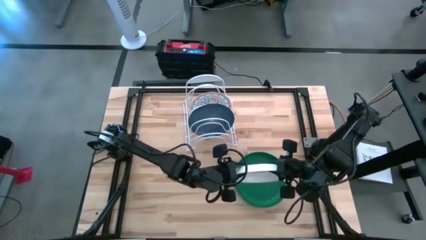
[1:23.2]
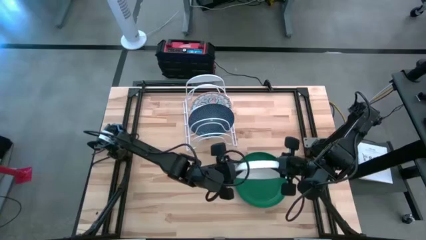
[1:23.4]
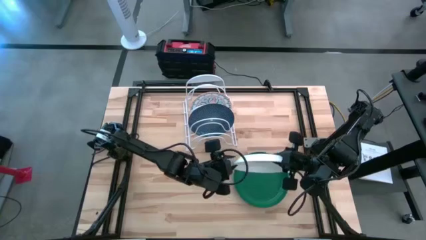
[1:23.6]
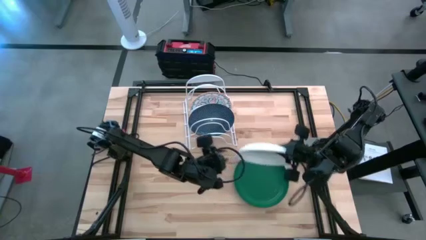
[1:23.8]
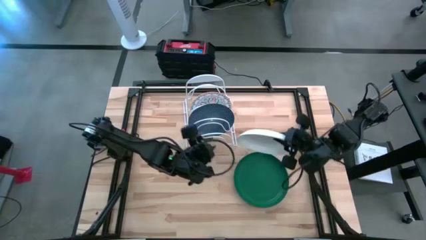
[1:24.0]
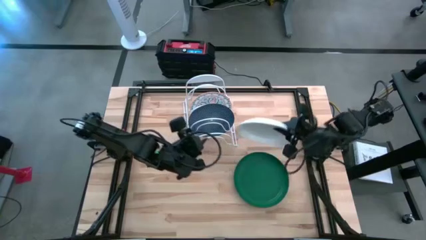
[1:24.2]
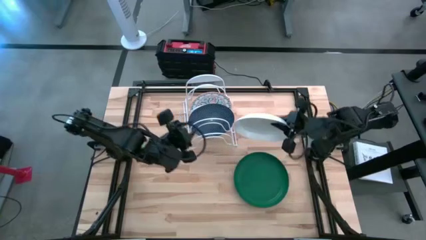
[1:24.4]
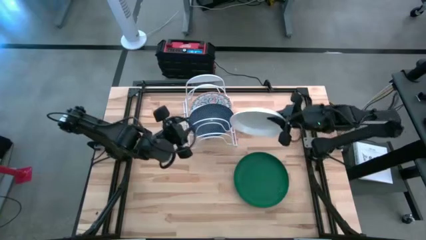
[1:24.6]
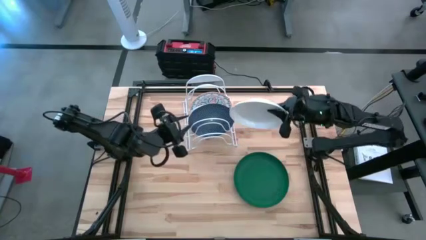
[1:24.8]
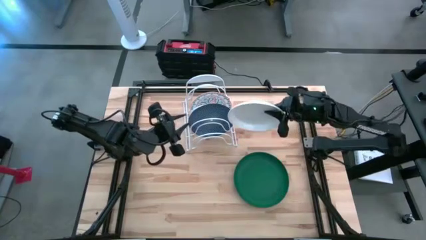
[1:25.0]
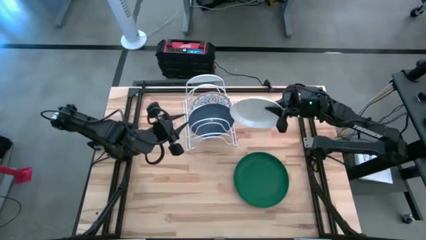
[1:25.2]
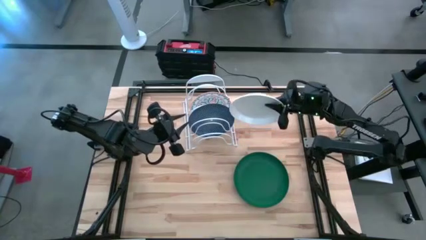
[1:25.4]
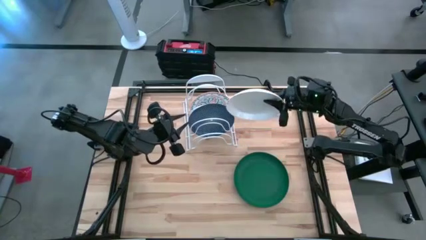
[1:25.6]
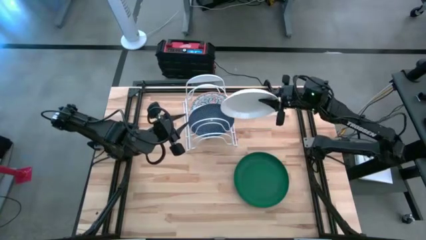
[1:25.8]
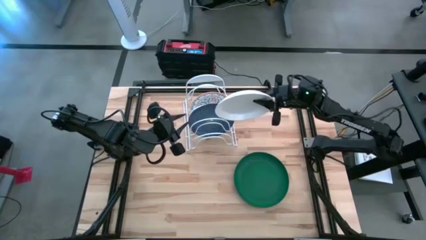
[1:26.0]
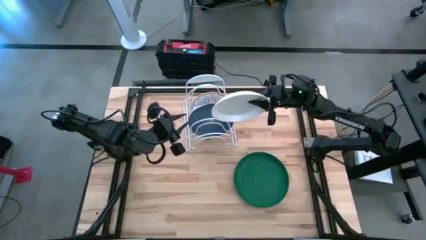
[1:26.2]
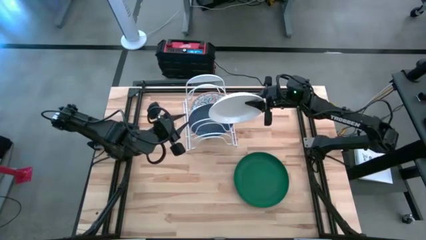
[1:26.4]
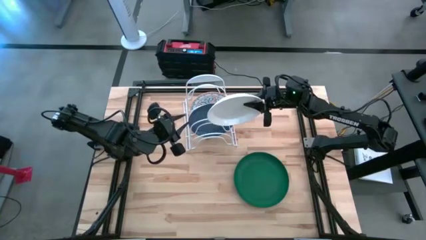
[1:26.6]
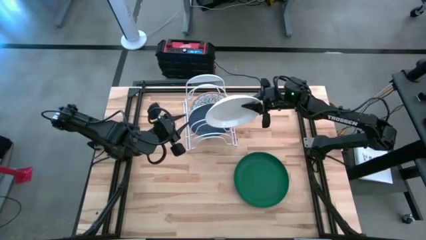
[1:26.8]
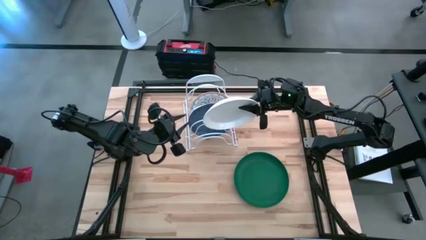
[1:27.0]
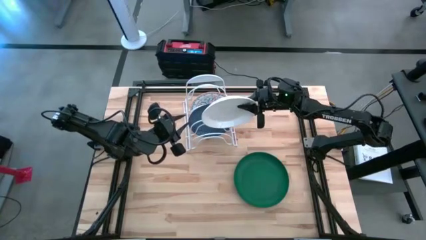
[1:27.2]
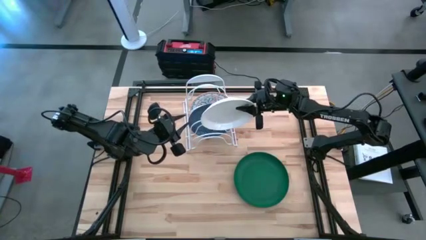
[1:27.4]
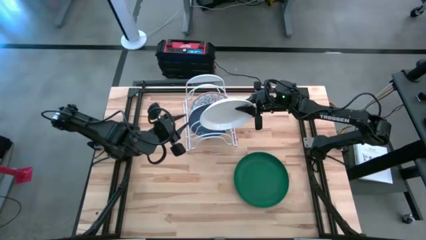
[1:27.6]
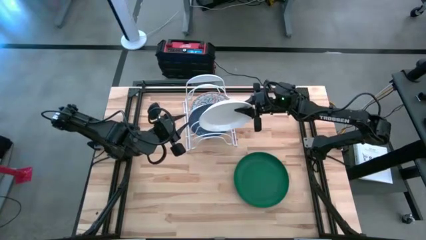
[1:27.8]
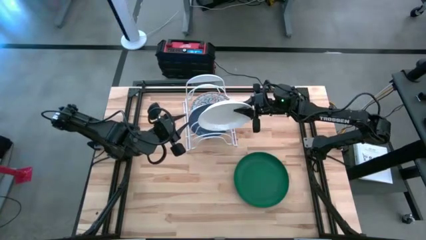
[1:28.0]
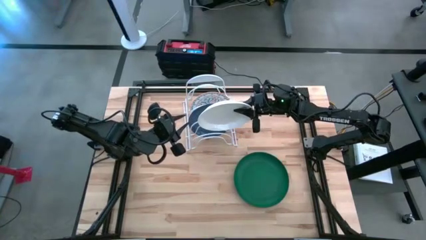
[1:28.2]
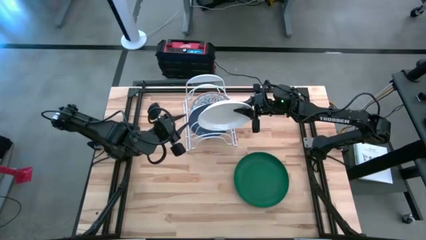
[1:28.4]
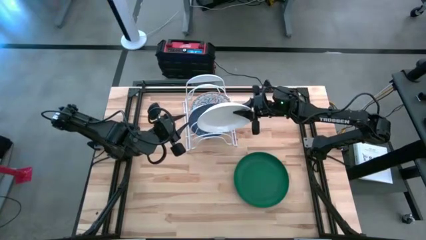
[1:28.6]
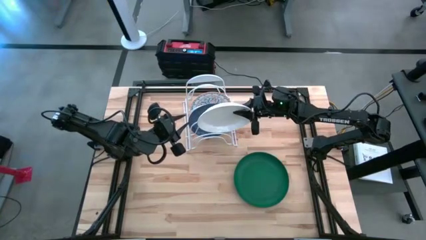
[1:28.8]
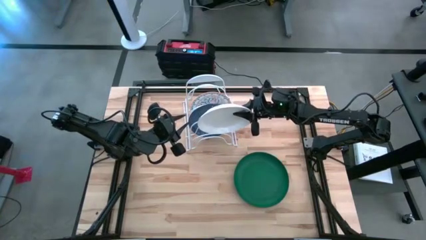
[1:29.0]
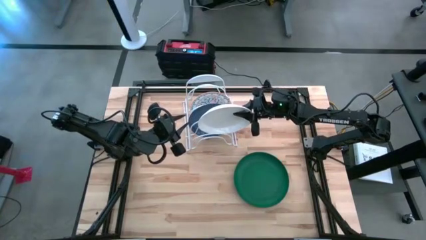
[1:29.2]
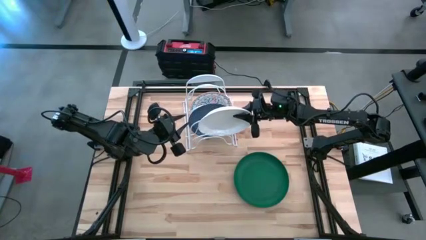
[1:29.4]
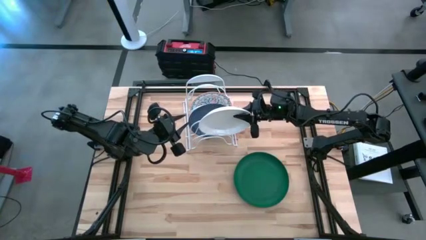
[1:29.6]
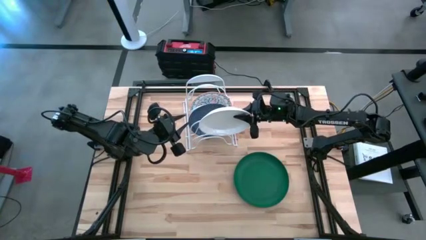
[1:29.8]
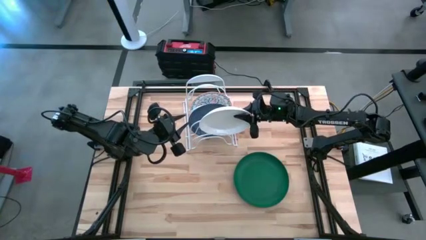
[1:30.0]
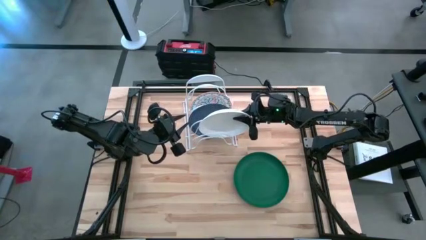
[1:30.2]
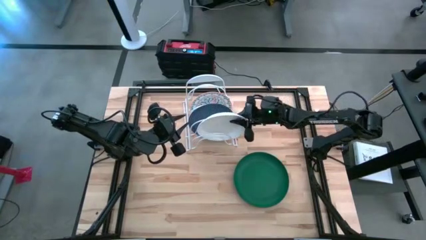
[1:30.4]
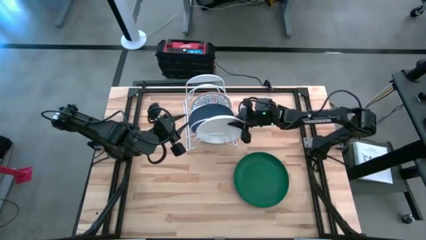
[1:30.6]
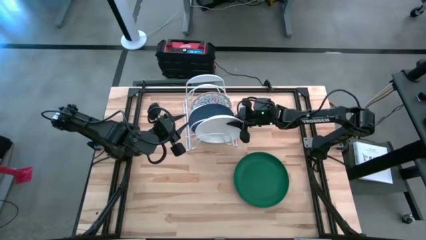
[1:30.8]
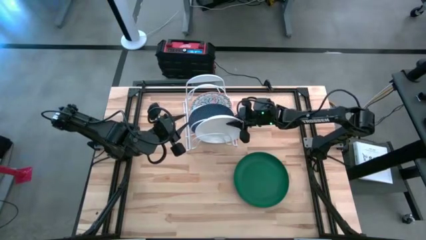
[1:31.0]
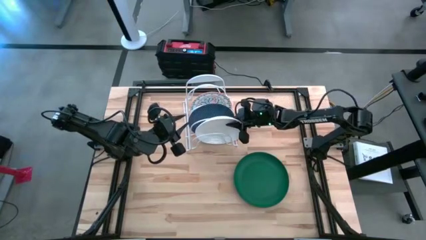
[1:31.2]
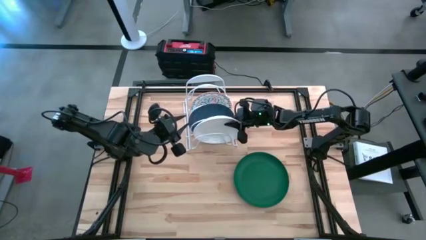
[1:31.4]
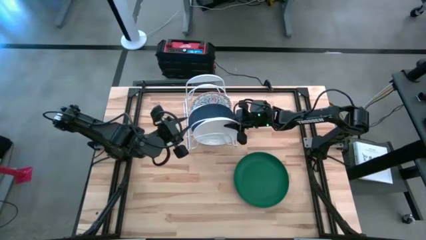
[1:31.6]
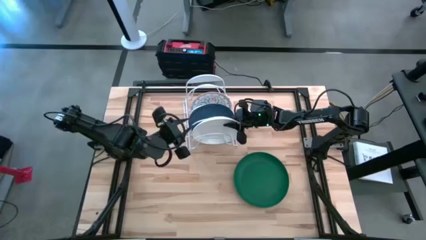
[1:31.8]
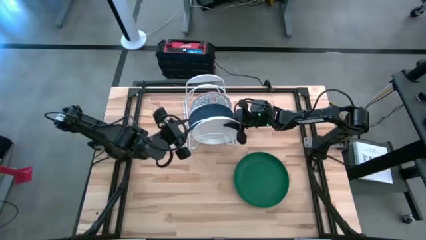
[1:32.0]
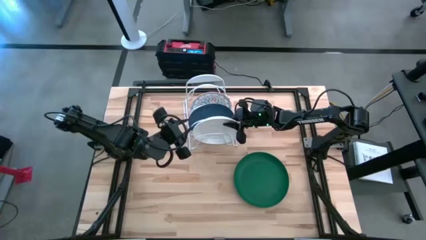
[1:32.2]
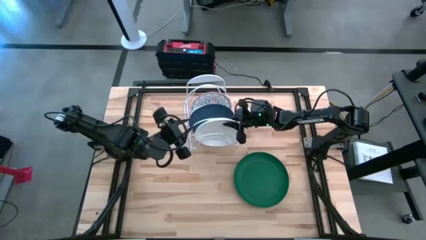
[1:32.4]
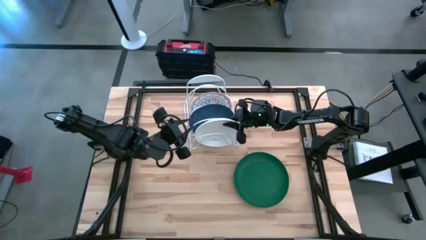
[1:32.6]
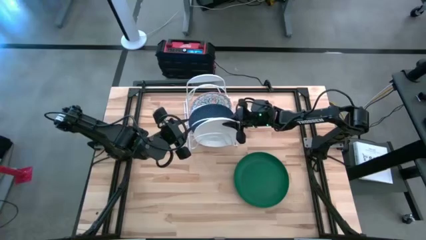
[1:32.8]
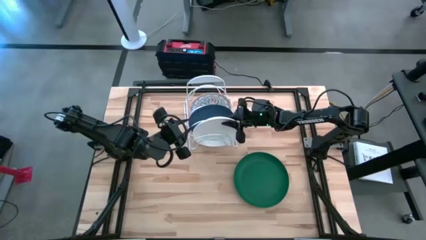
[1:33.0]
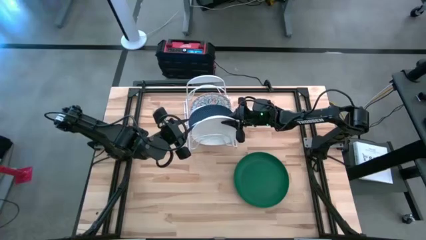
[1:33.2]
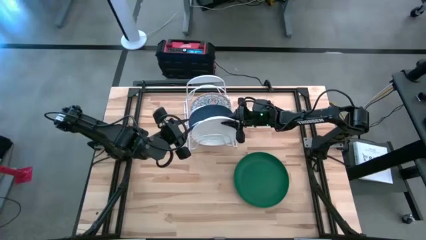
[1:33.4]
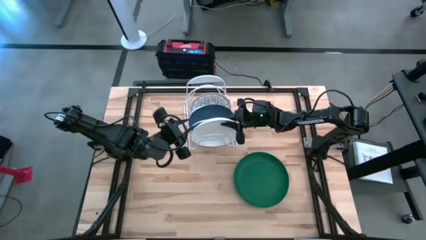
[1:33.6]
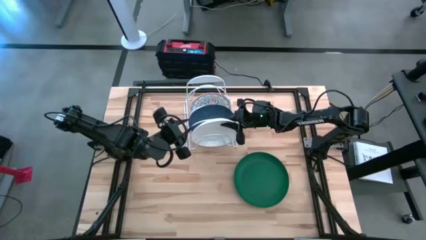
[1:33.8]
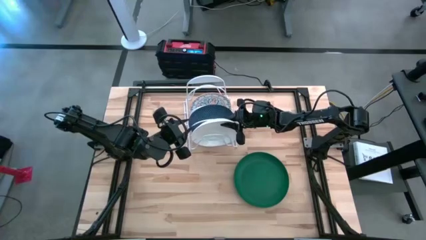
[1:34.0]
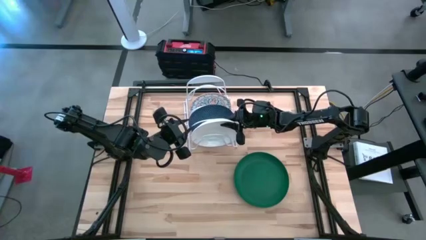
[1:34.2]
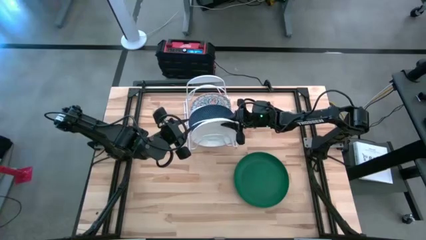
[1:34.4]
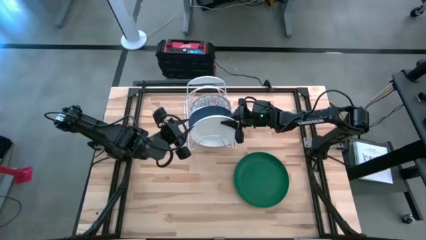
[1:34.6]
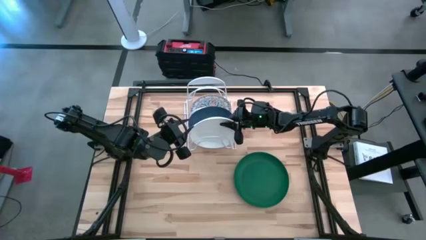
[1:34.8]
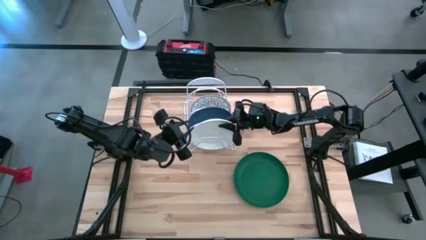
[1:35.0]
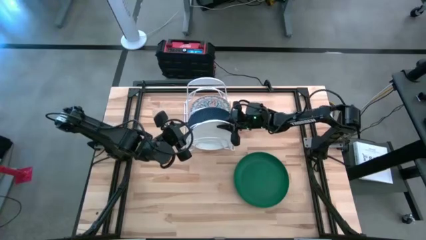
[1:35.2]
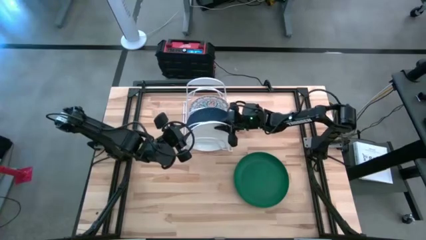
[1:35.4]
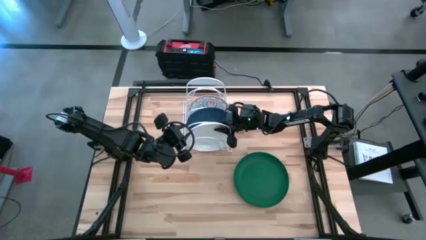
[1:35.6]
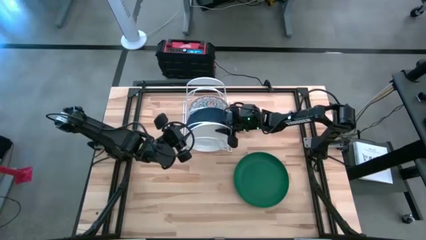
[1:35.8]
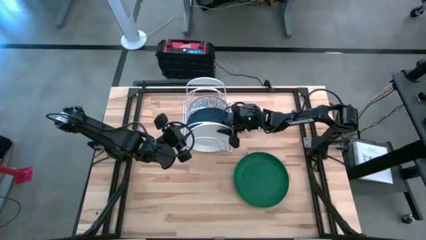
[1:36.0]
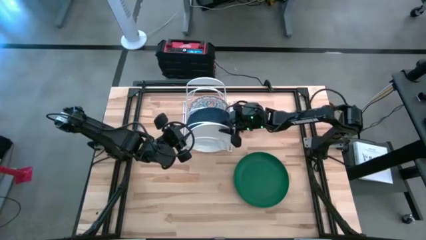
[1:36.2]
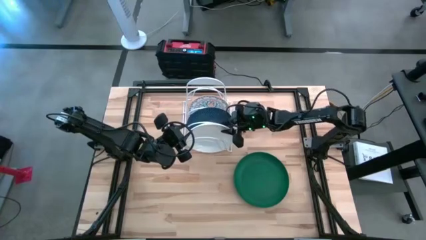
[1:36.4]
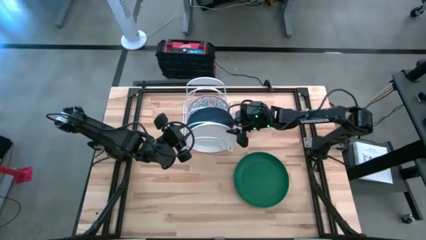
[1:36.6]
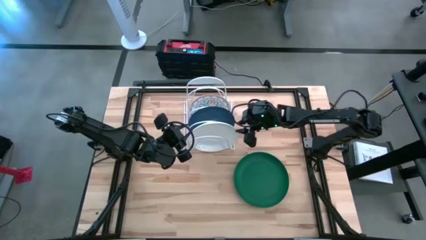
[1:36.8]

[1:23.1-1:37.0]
Task: Sort dishes
Put the white plate into the dish rack

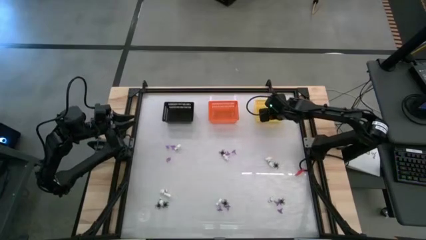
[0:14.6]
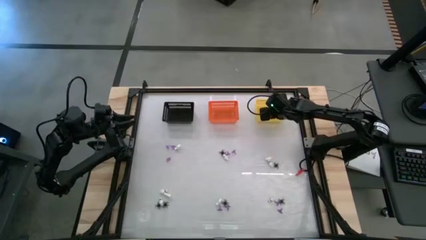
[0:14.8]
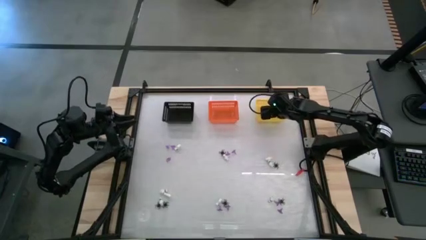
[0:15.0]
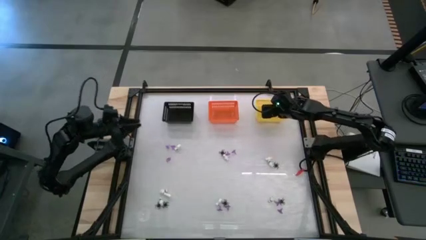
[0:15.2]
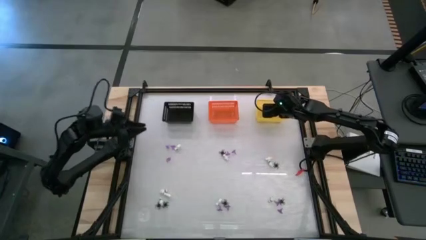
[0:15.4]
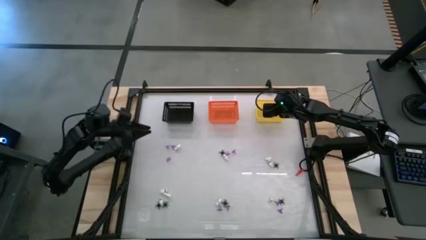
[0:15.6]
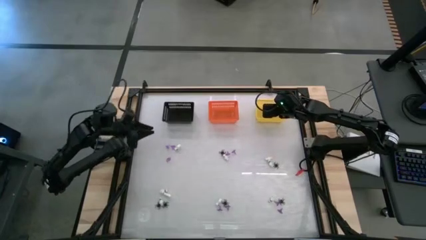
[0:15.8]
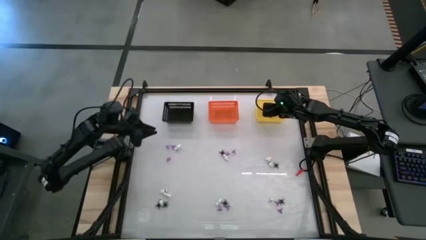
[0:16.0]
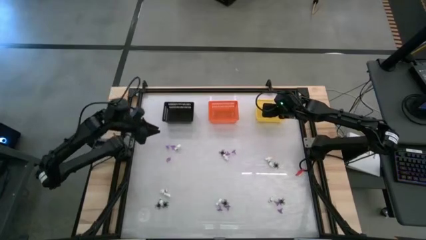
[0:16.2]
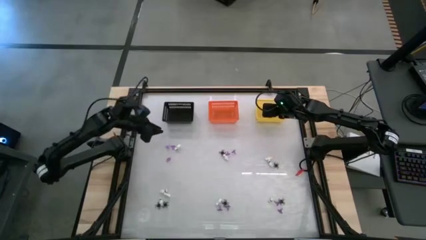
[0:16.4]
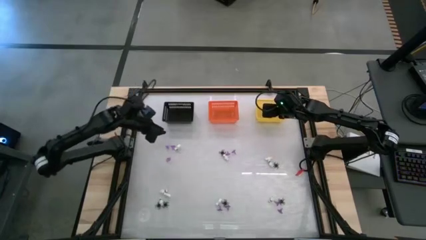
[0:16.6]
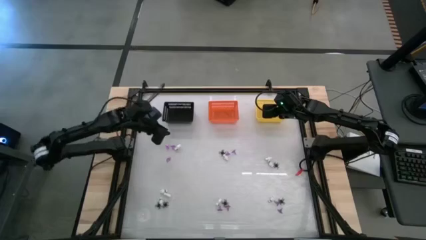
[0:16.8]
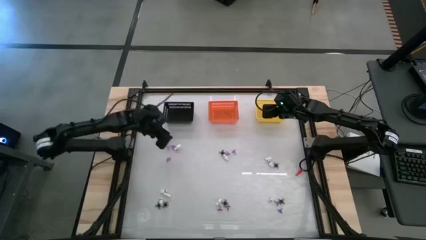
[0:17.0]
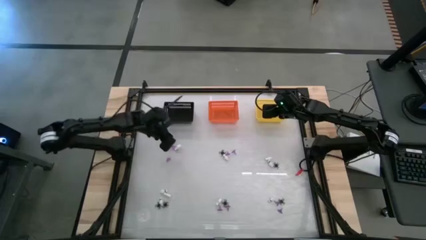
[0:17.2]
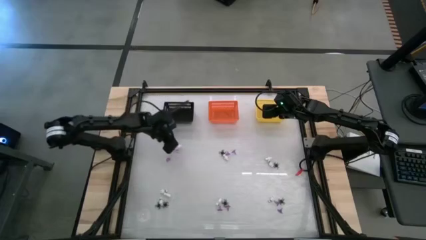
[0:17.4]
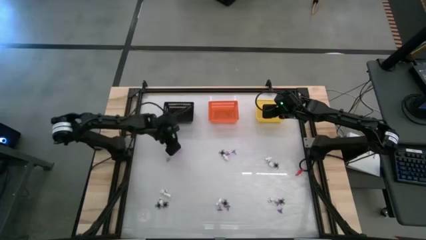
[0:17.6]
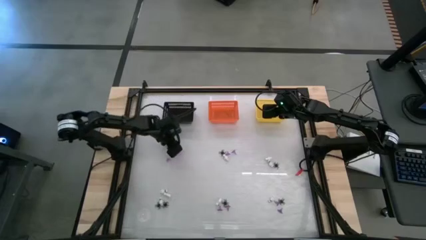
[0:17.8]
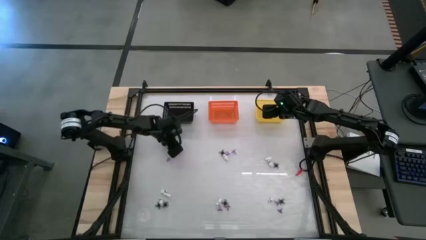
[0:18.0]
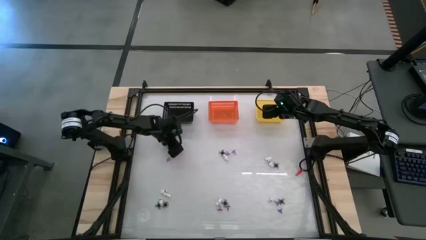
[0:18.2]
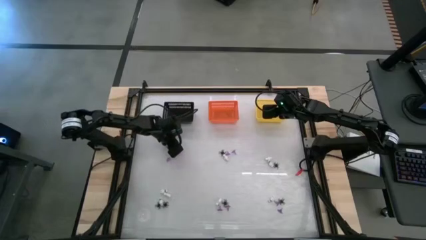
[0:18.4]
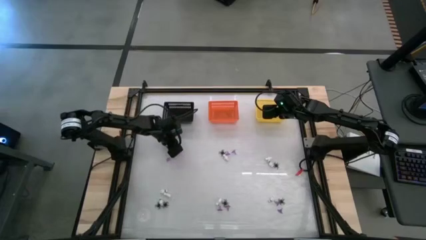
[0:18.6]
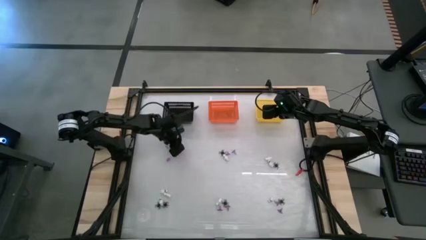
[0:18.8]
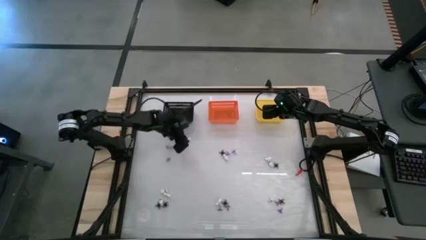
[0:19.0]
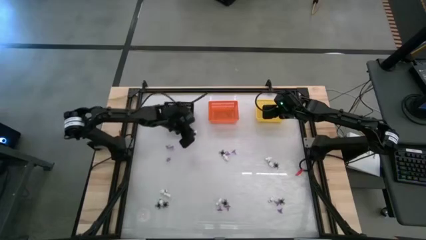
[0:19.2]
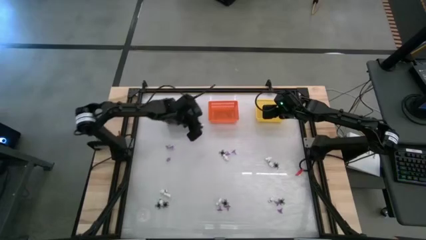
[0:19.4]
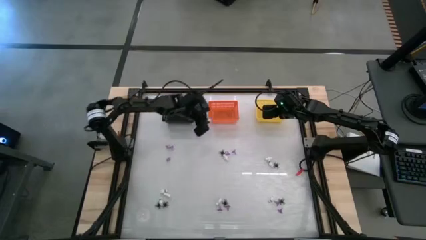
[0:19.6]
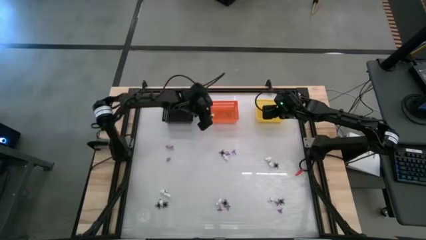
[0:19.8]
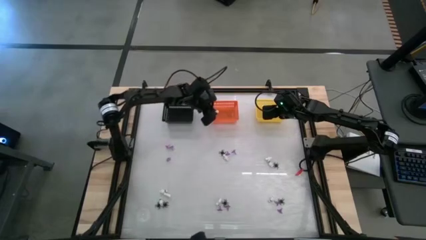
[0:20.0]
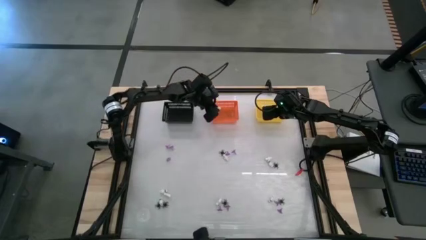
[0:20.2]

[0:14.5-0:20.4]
Task: Sort Halloween decoration
Put the skeleton toy into the orange bin
